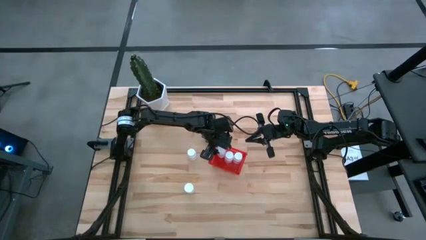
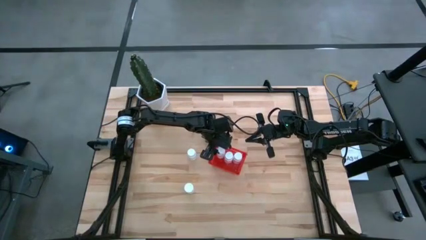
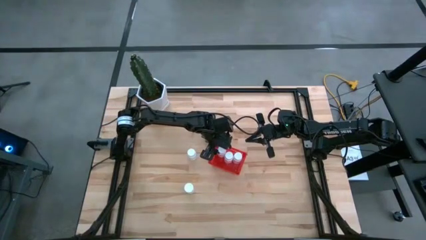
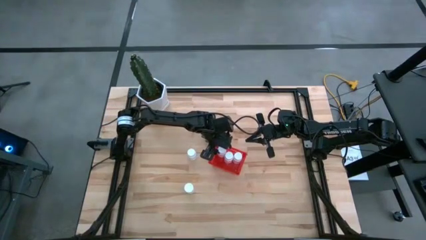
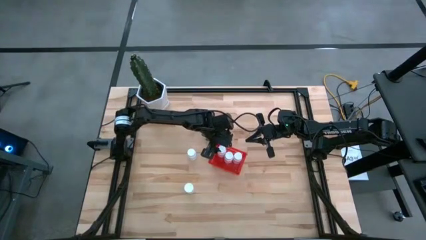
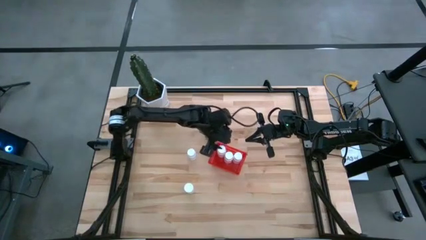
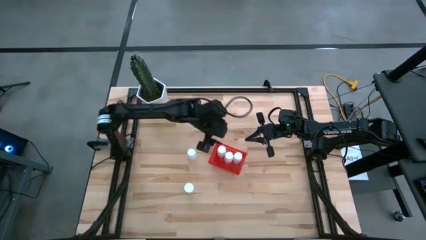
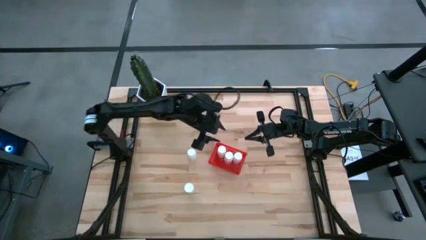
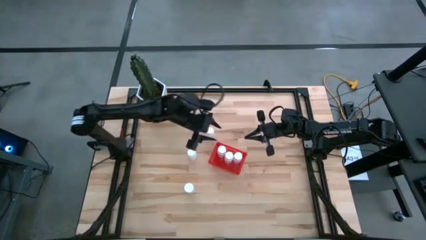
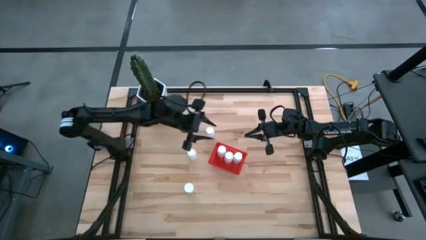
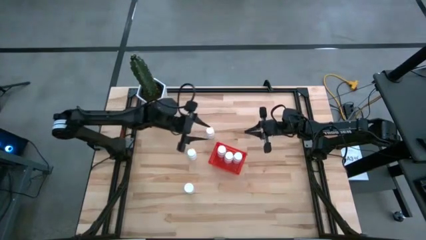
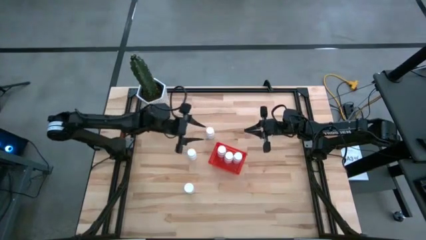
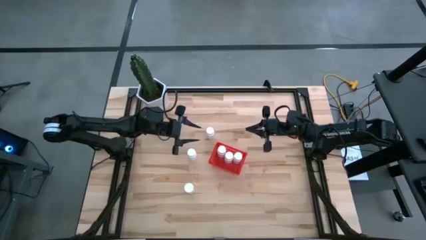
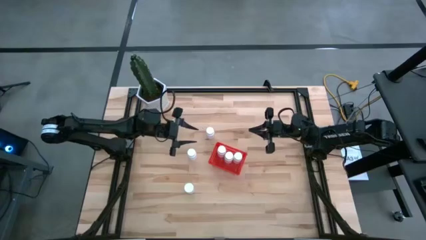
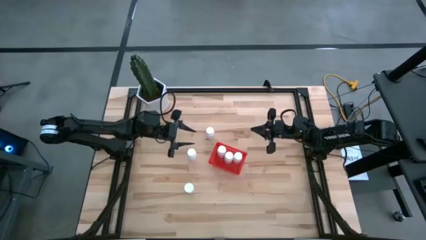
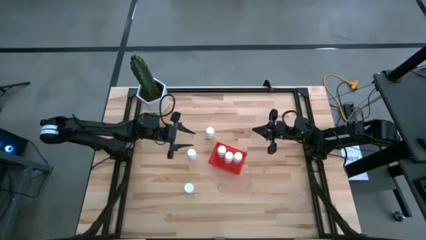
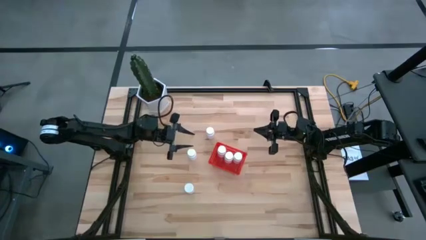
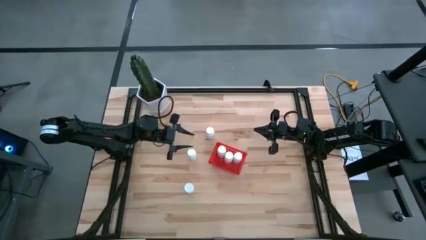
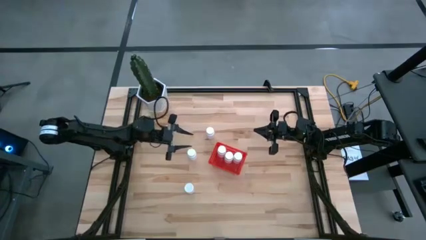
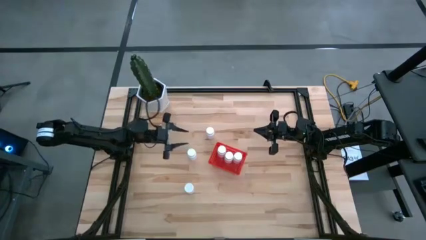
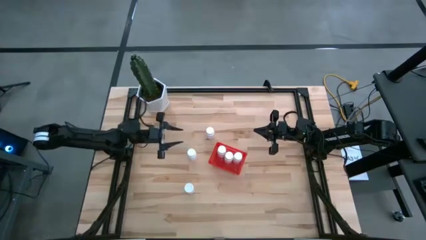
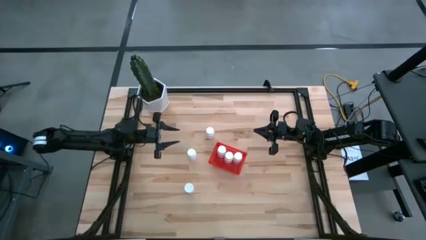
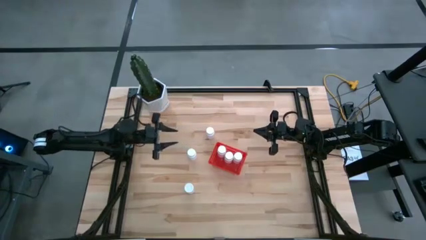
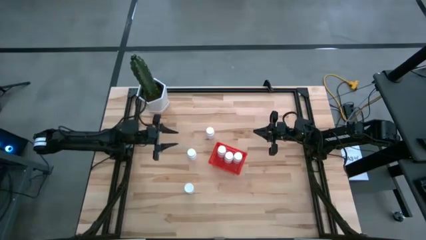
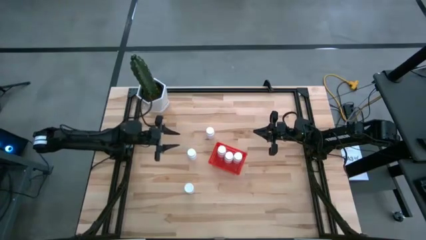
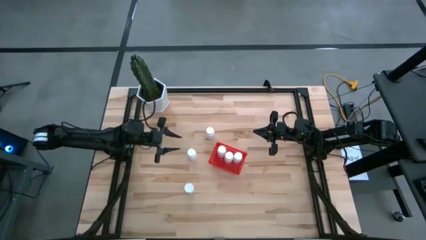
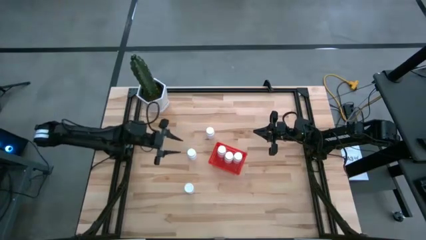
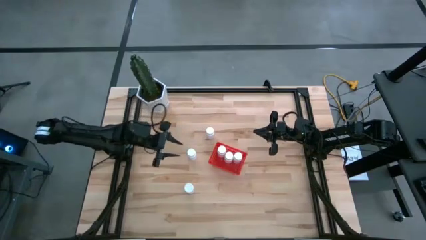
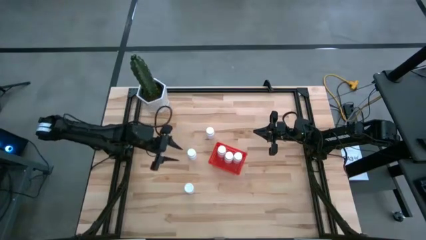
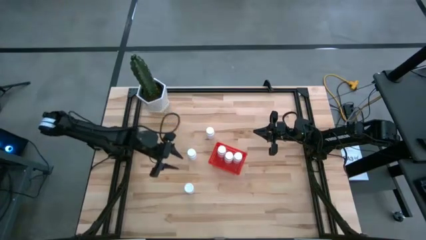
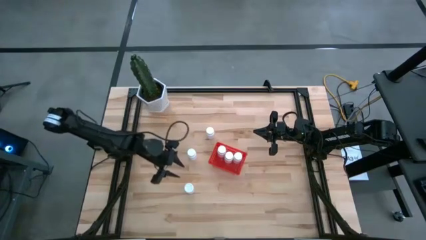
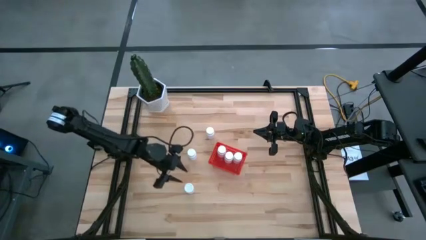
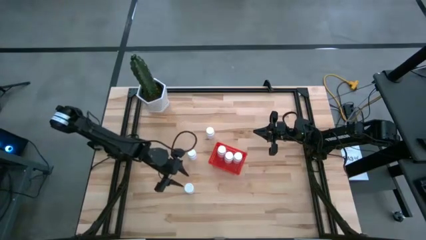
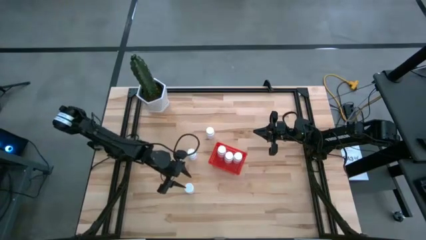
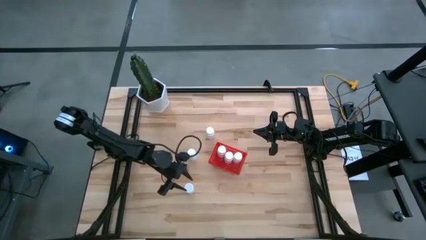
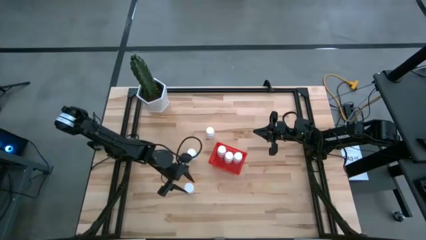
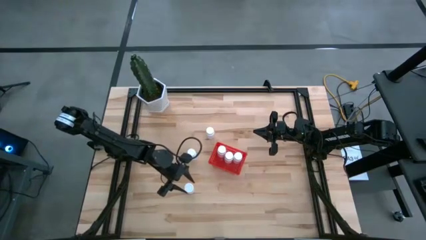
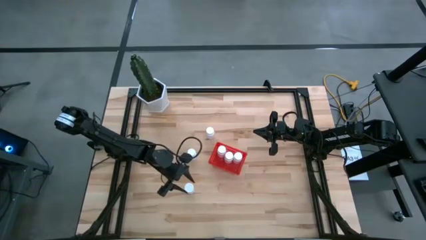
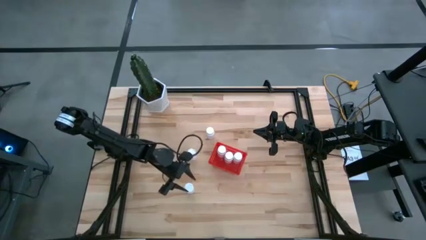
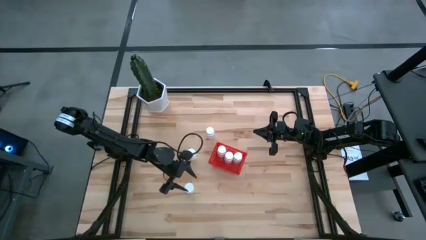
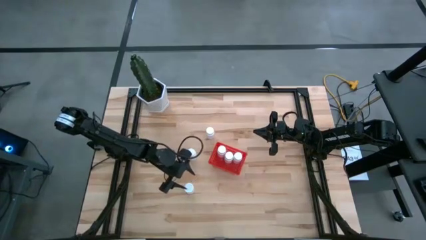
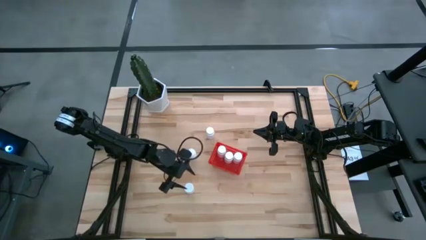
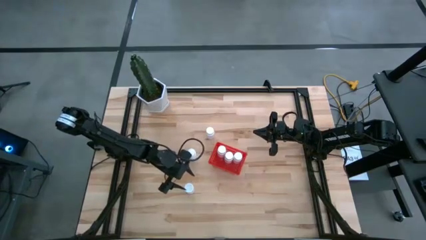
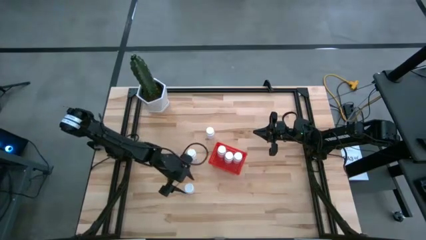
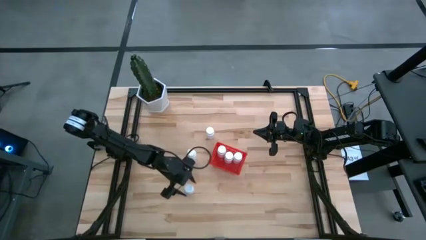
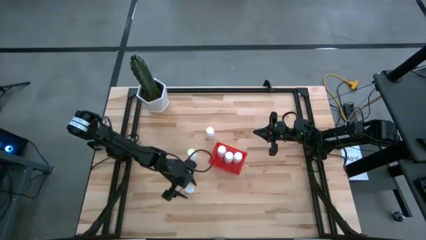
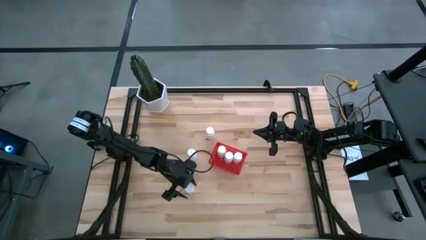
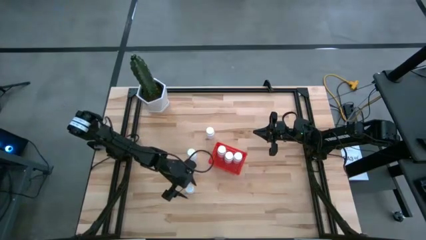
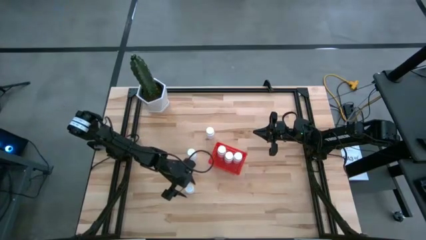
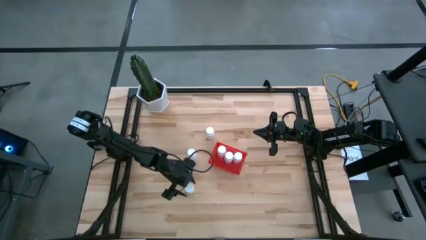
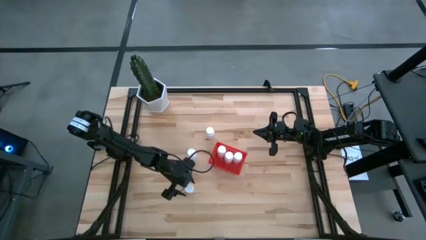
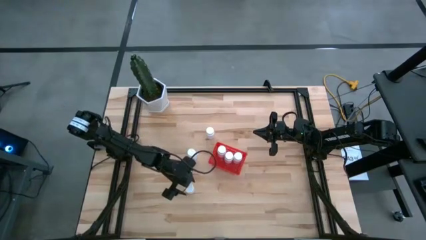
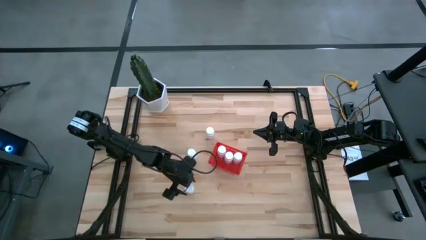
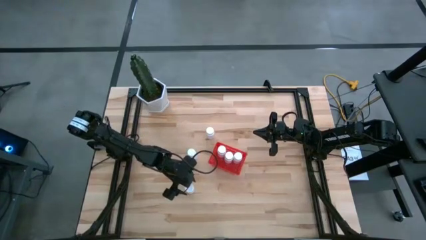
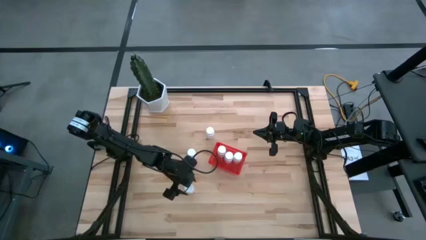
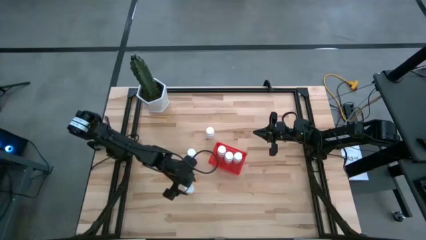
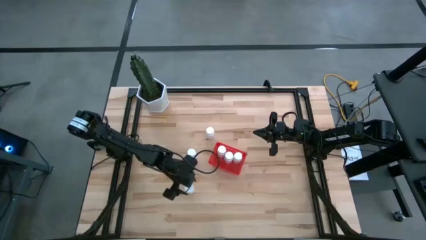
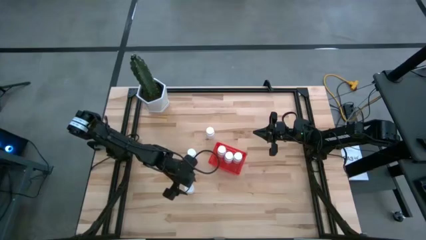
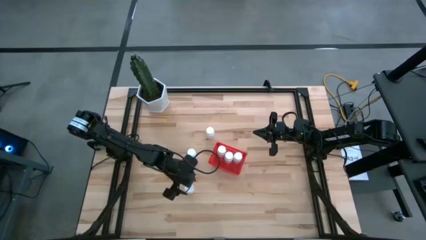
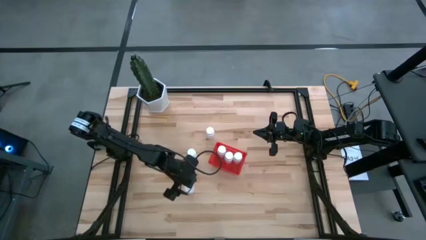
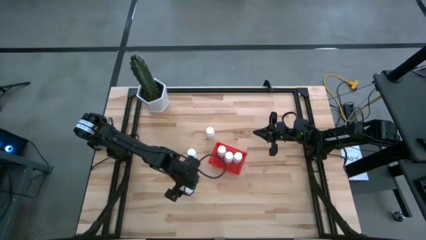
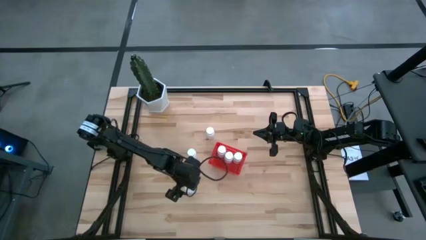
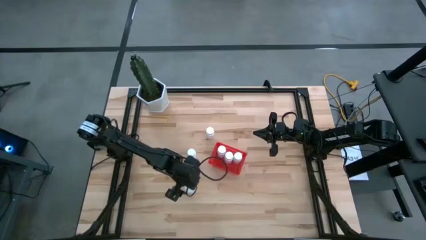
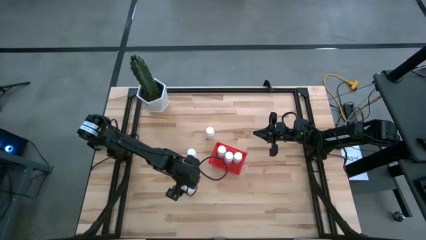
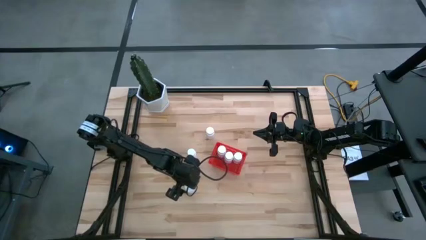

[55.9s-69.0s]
Task: Pick and place pill bottles into a basket
Put the white pill bottle into the red bin
